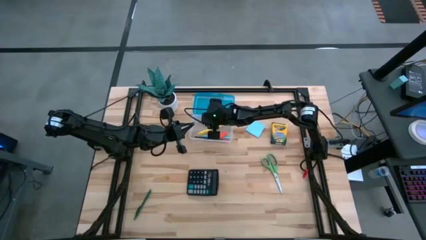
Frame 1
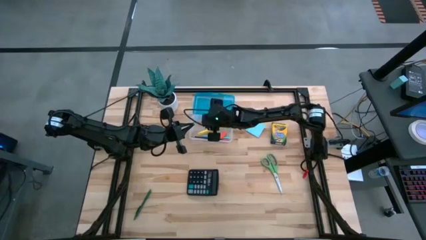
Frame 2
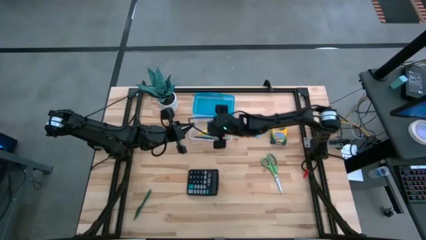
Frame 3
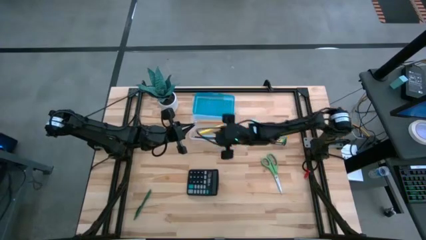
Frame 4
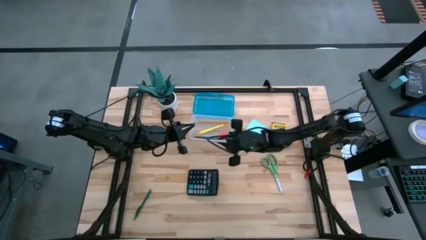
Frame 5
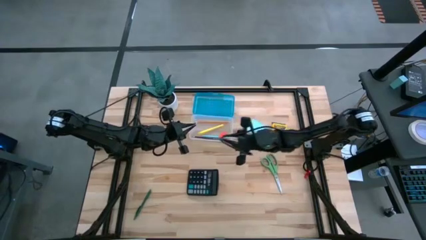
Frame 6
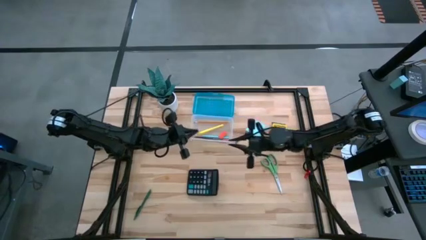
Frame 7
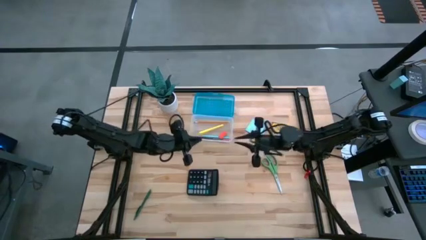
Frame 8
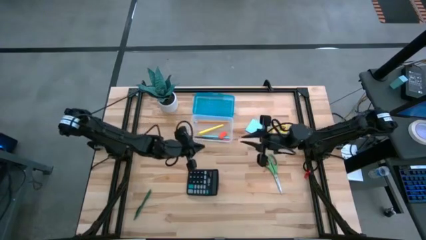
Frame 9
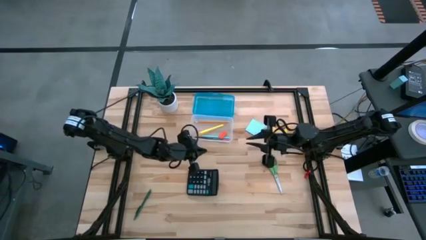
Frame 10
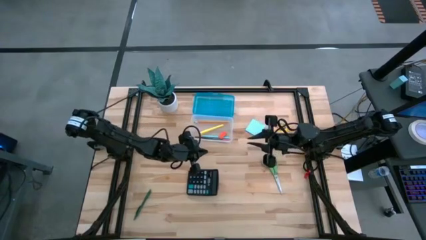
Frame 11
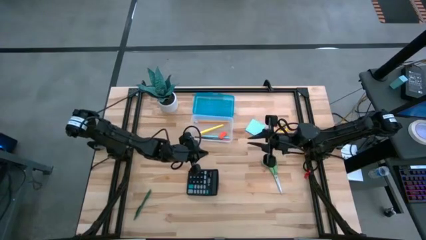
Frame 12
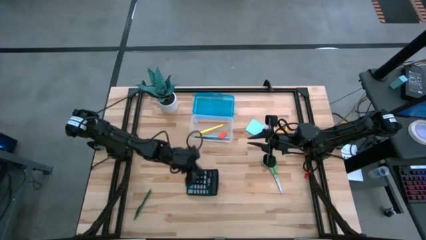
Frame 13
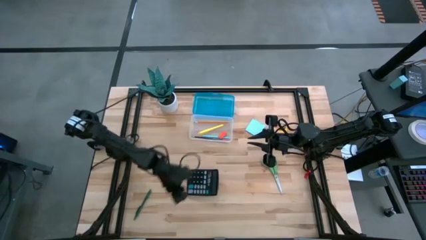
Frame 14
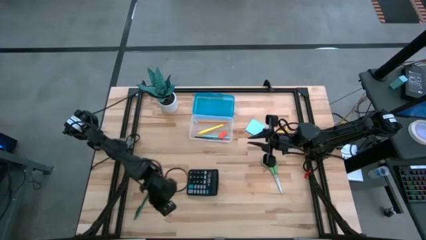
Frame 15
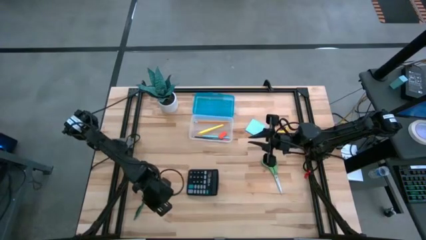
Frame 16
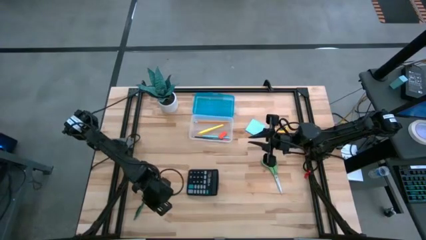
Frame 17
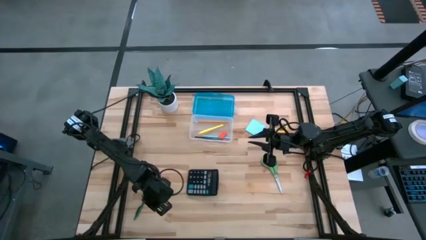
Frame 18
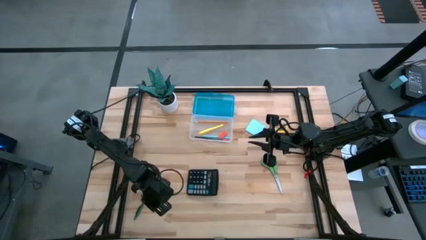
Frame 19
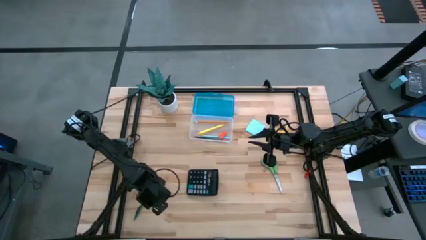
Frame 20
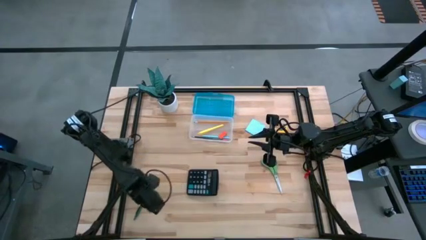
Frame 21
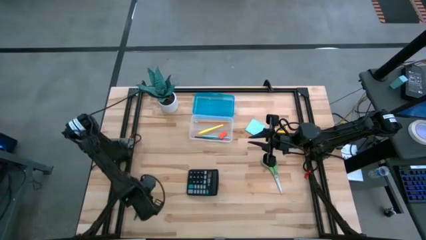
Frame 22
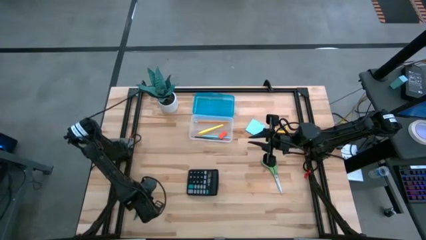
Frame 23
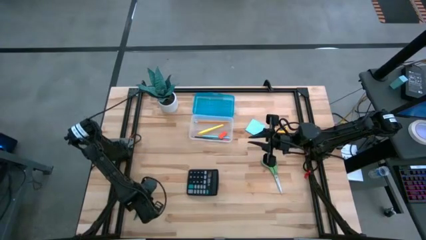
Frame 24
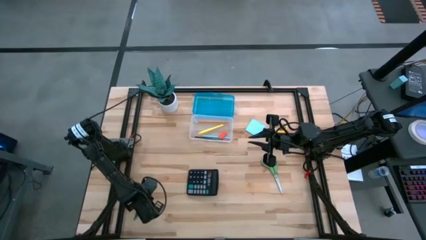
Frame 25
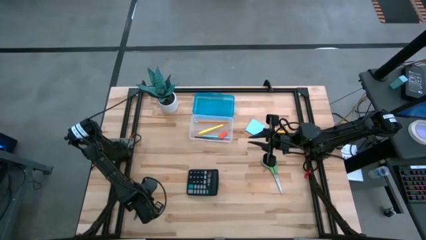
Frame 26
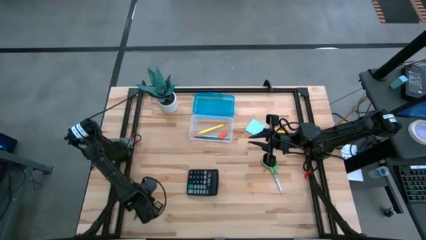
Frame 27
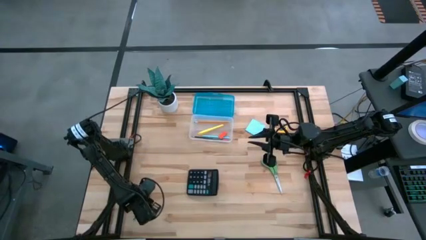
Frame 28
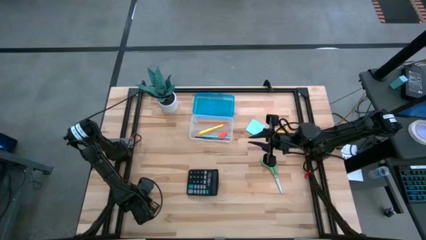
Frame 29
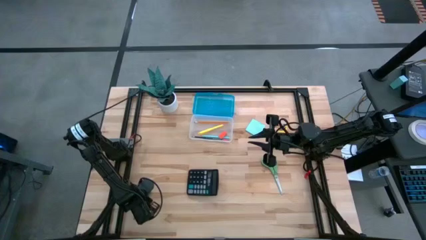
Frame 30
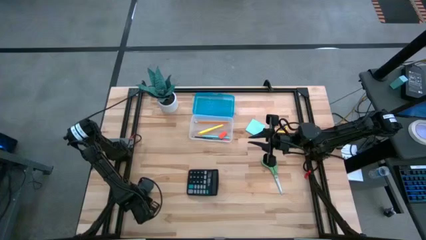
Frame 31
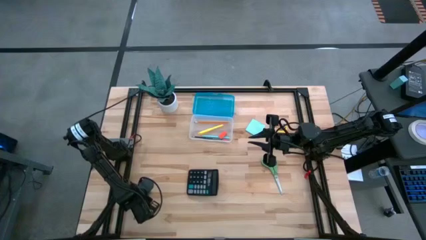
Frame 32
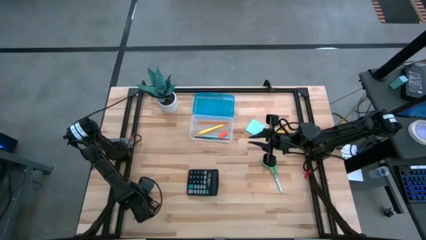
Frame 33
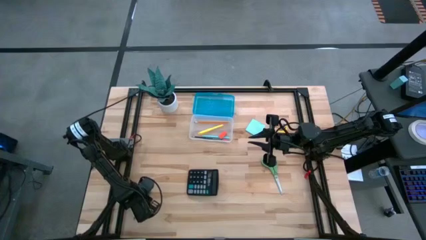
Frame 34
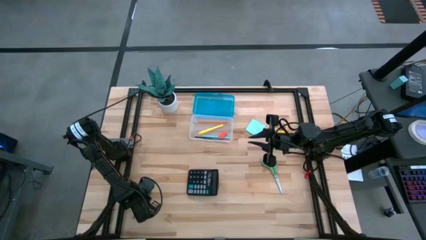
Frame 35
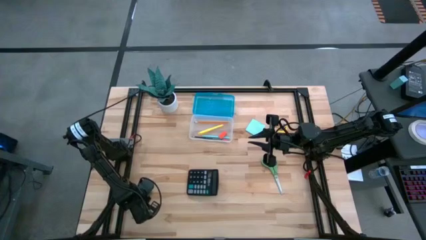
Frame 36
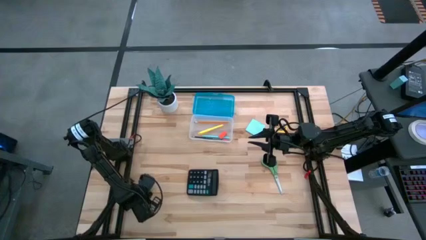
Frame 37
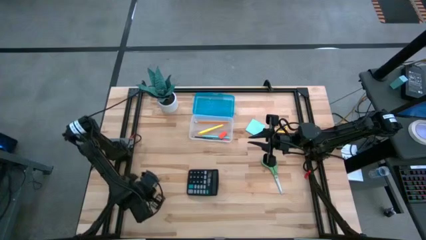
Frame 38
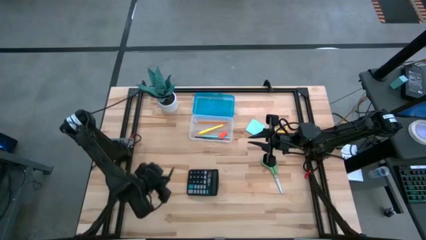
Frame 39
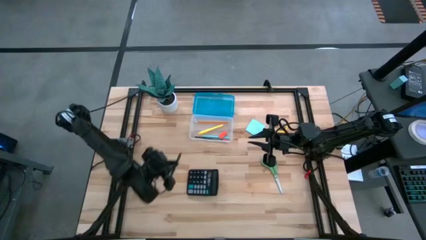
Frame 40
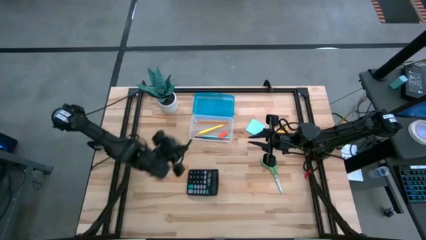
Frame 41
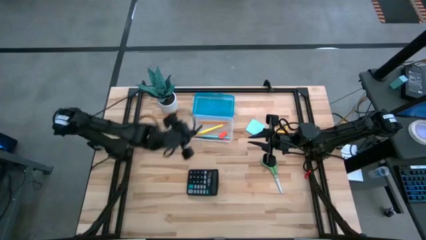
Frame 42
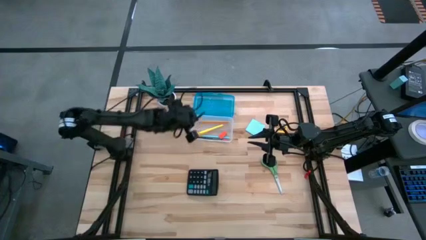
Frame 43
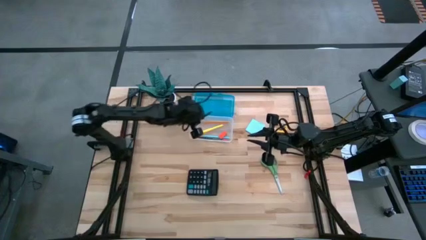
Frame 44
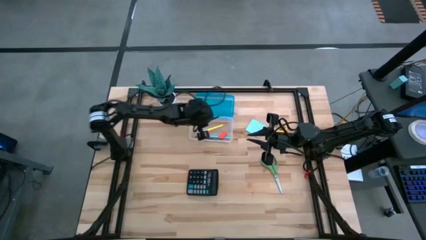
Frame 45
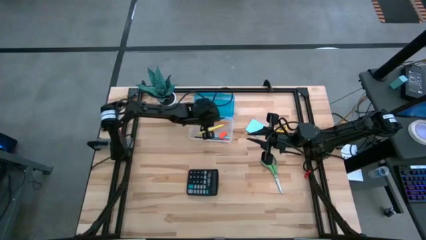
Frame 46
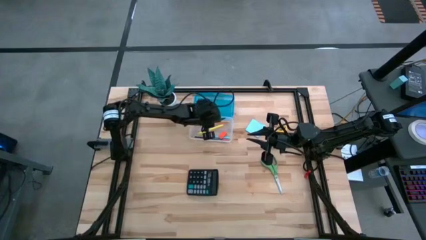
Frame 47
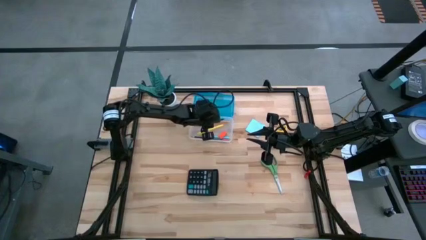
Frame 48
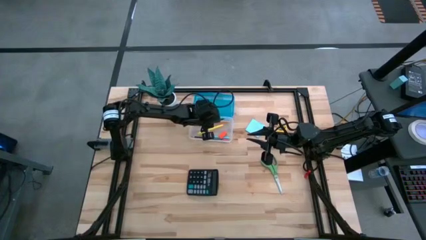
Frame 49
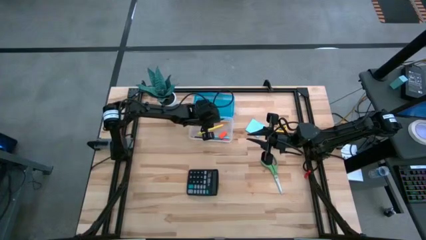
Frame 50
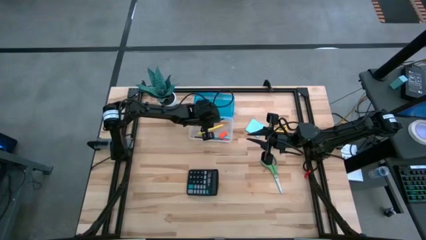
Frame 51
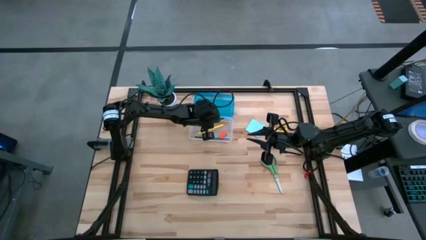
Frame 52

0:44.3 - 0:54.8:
Task: Pack school essentials
Put the green pen into the blue supply box

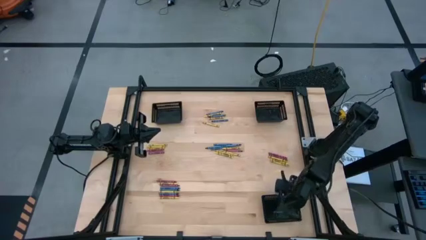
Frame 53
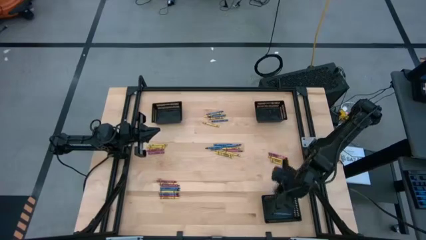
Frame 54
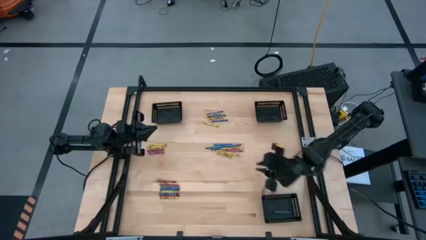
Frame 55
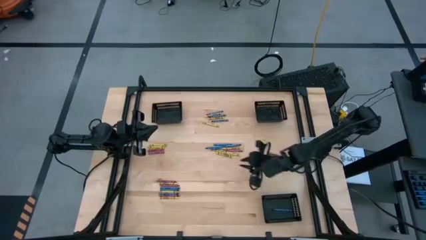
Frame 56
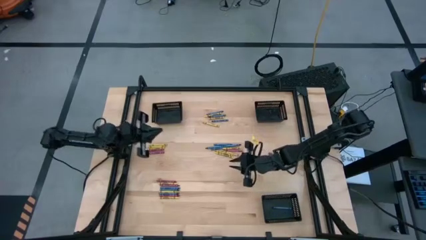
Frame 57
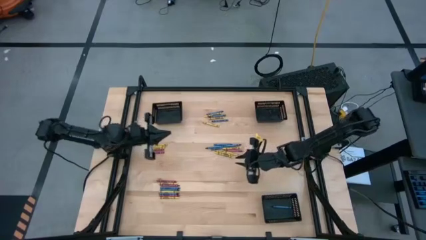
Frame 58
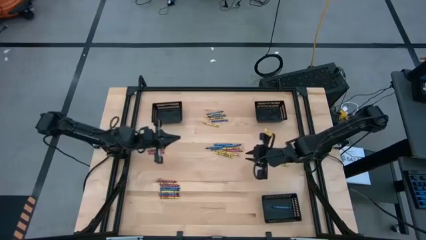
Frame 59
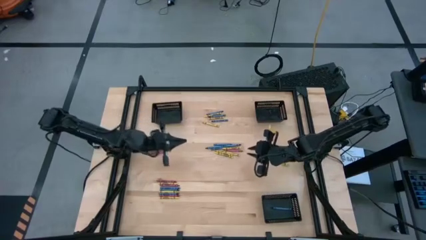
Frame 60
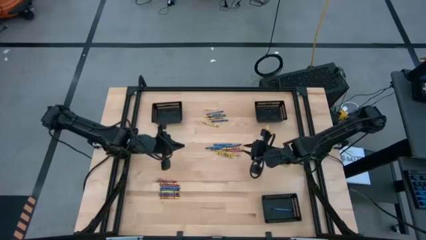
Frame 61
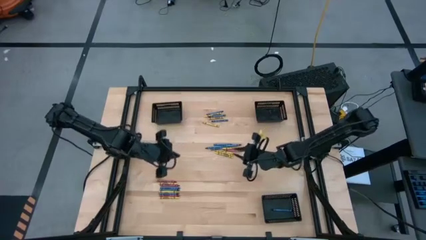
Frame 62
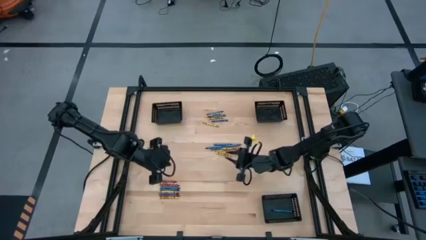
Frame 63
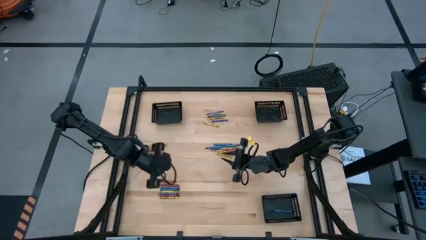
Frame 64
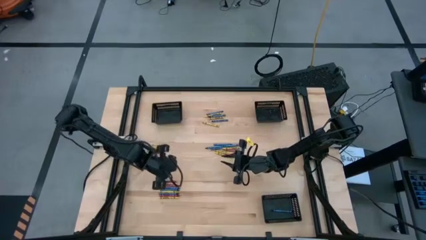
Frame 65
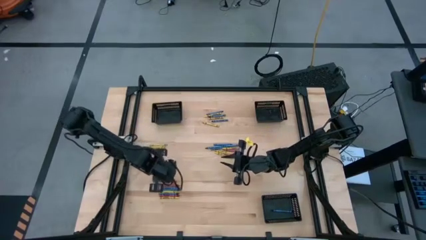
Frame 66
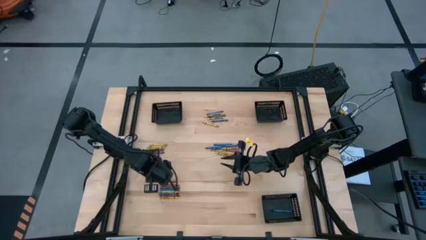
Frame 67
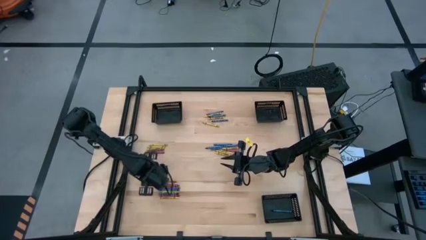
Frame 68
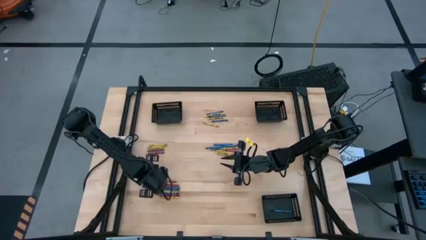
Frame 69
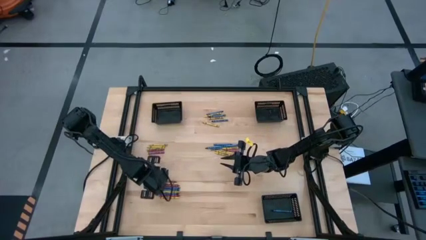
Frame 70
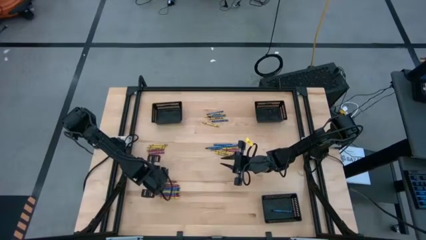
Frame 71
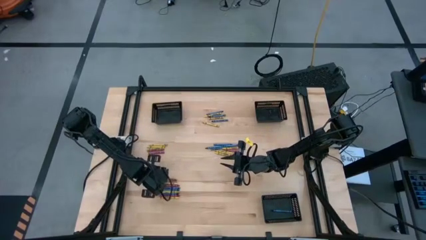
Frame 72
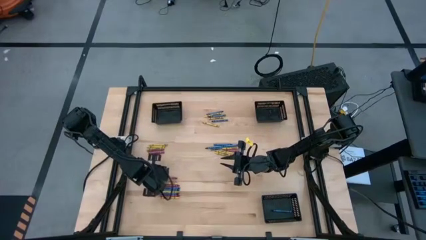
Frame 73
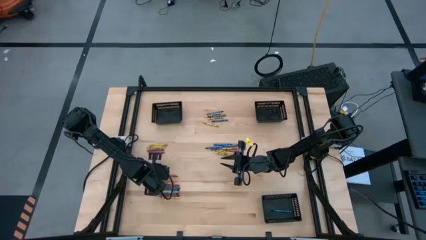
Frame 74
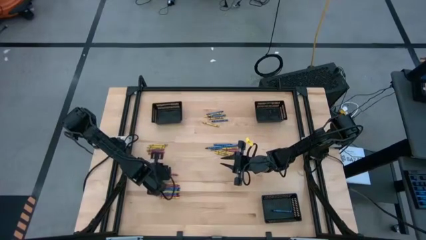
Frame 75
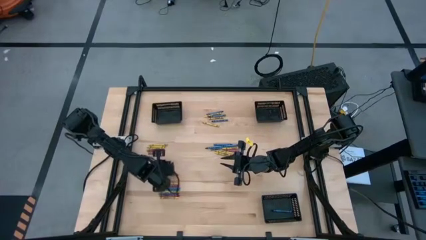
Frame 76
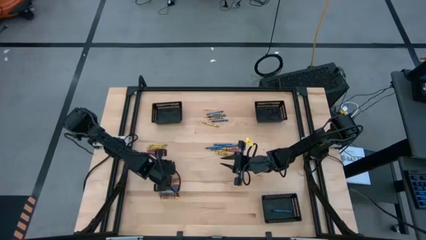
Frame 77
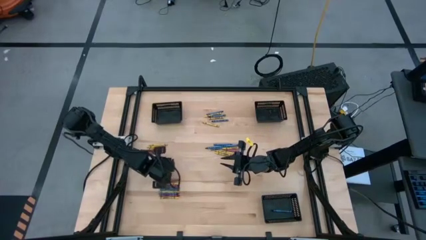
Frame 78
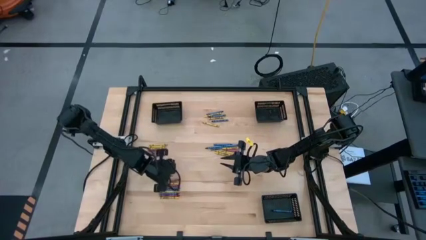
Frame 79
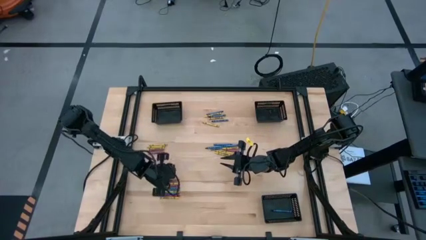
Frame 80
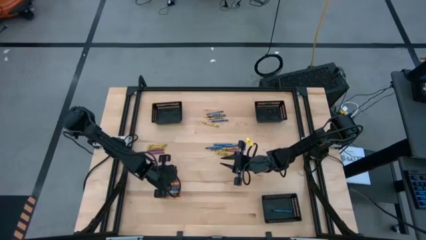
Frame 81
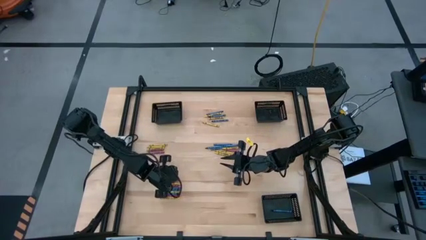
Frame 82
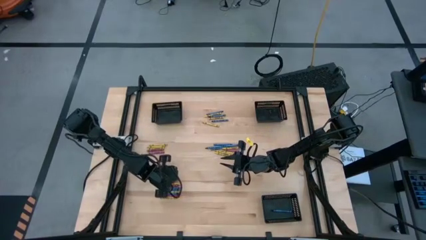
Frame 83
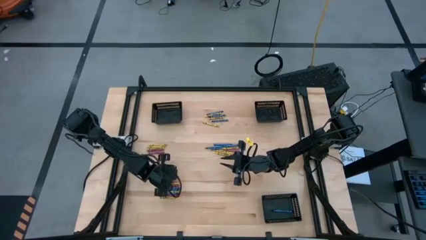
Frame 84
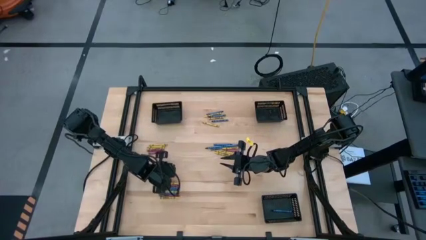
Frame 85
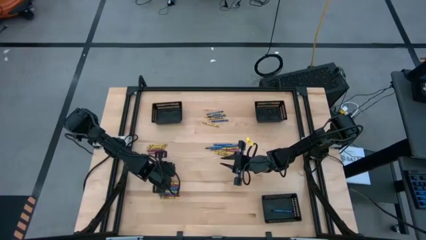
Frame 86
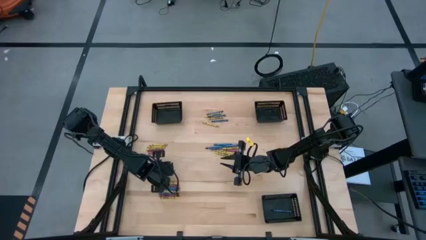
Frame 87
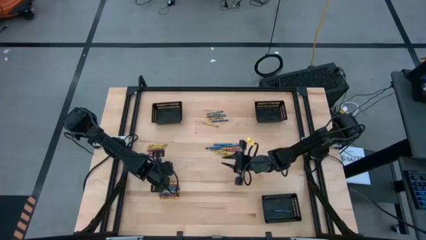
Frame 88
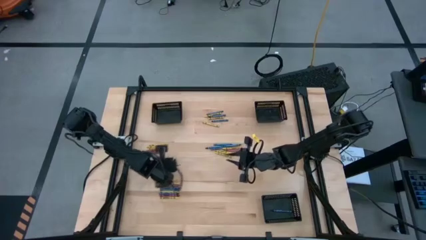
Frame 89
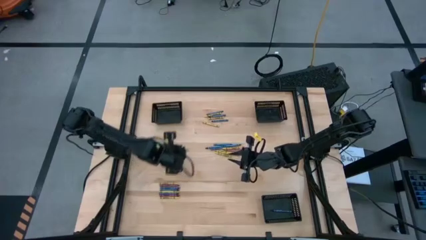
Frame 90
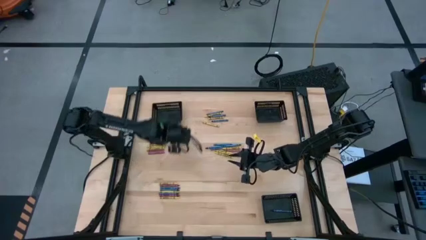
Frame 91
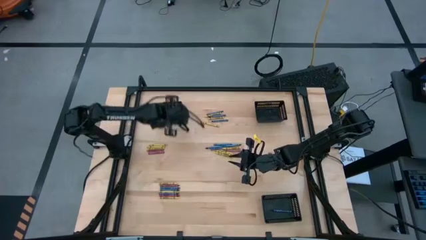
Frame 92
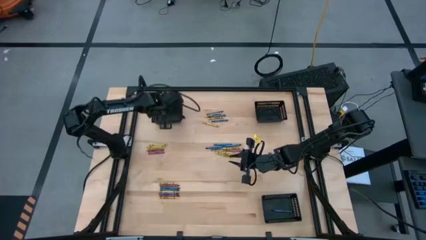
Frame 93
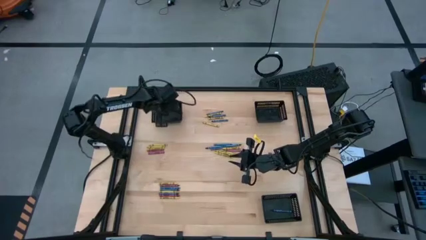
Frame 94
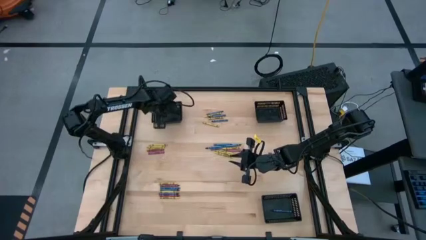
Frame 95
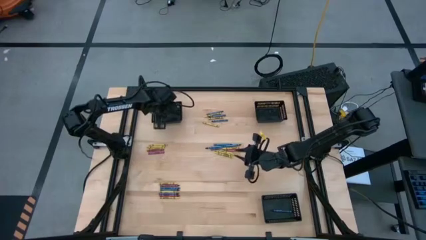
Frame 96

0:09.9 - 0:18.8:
Task: Sort crayons
Put the red crayon into the top left black bin
